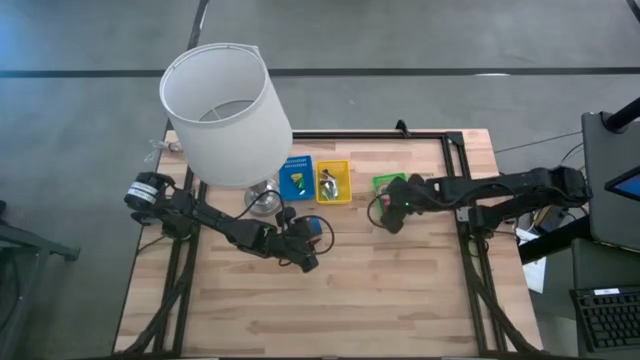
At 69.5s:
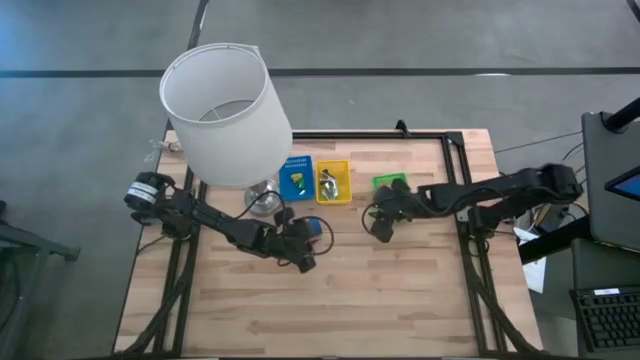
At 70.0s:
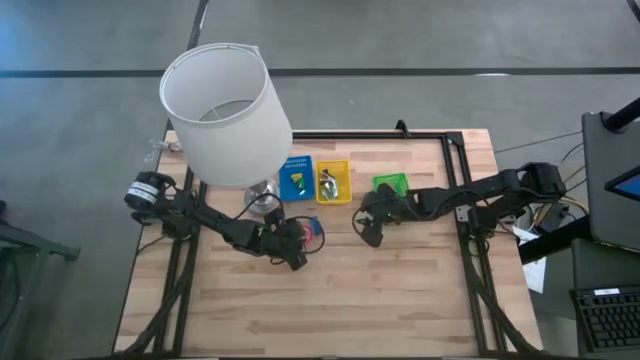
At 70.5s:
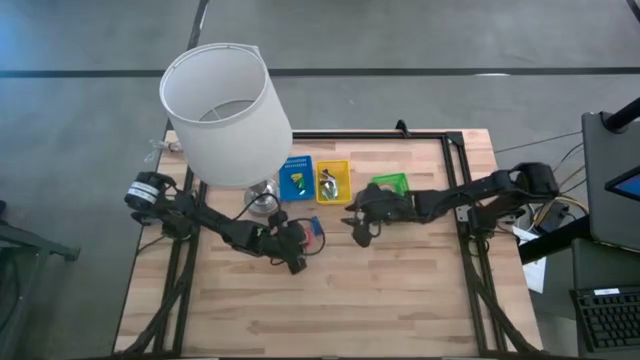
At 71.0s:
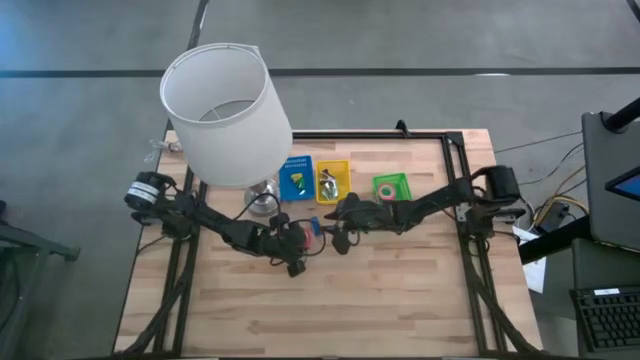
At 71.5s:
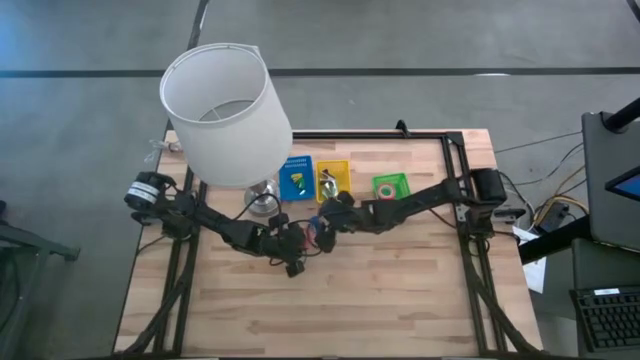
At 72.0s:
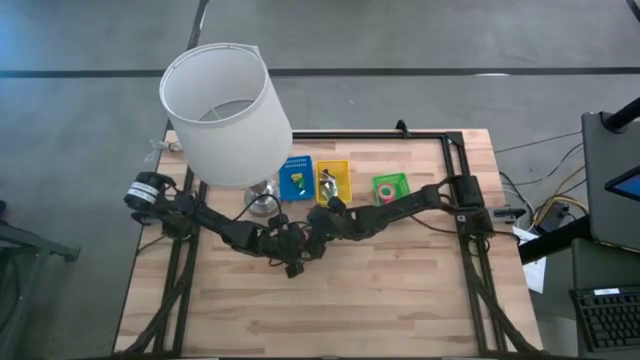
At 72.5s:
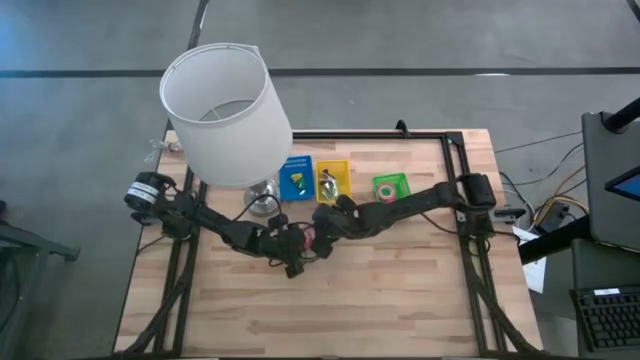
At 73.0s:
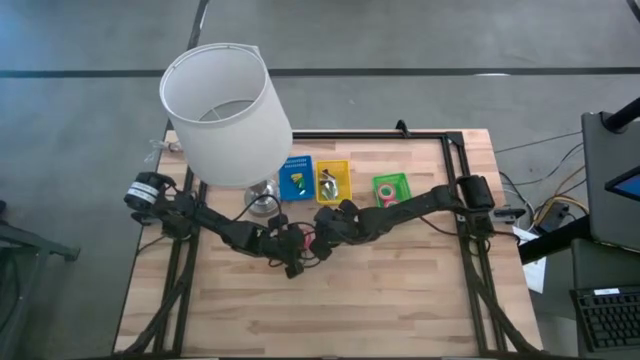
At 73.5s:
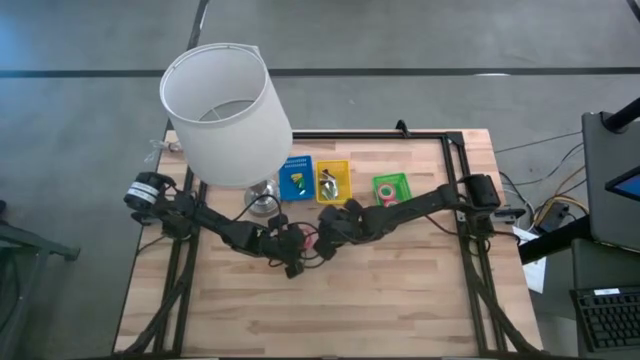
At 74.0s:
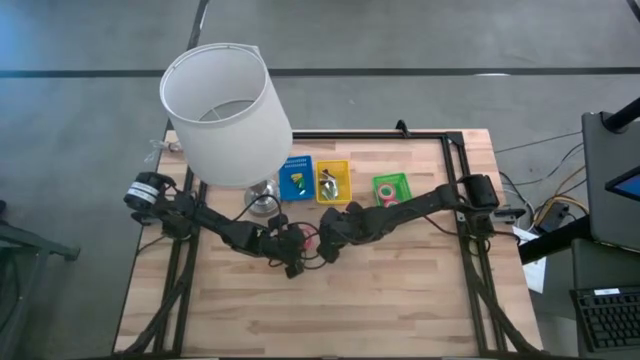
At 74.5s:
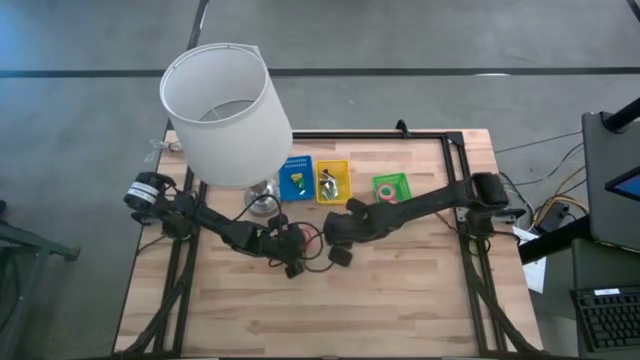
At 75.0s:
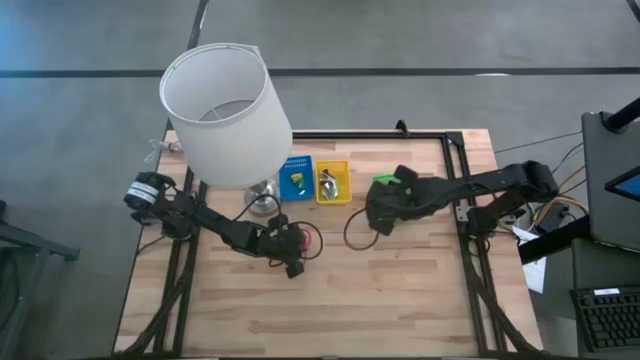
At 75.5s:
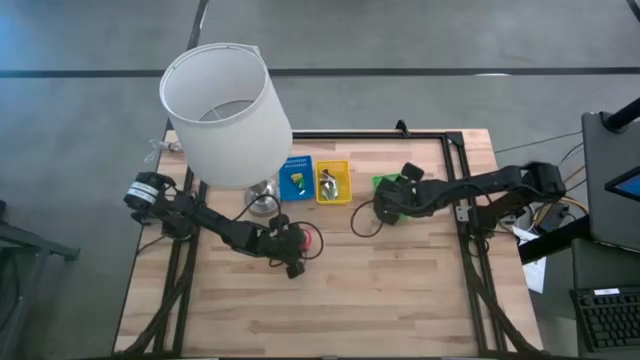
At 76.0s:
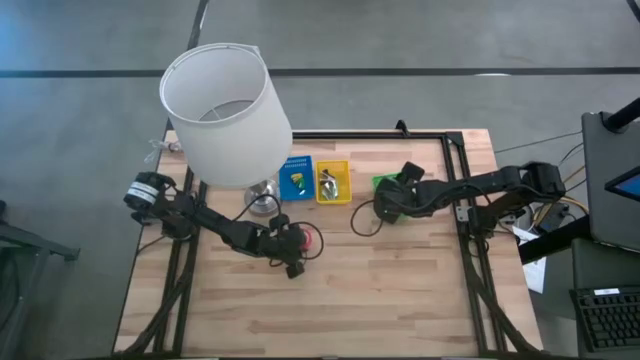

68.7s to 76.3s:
Task: Pick and place Stapler, Stapler remover, tape
Put the blue tape into the green bin

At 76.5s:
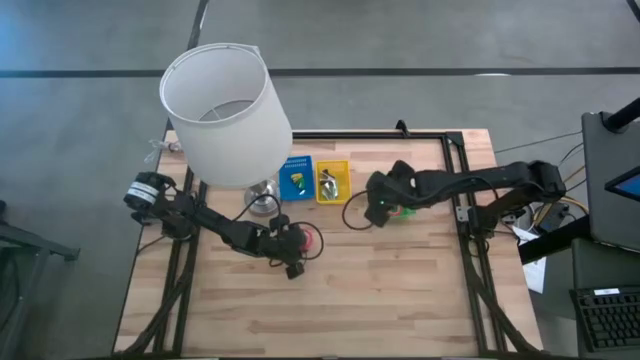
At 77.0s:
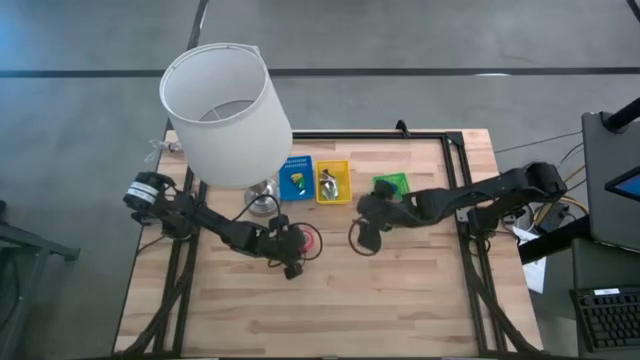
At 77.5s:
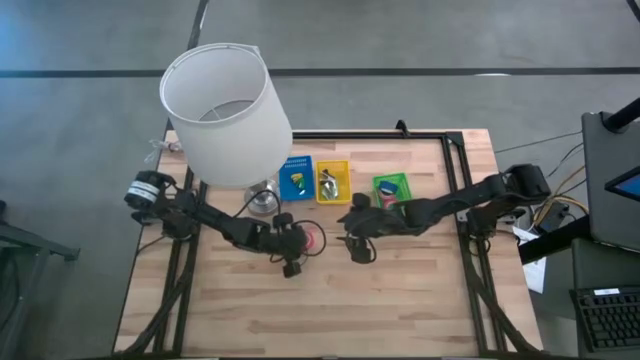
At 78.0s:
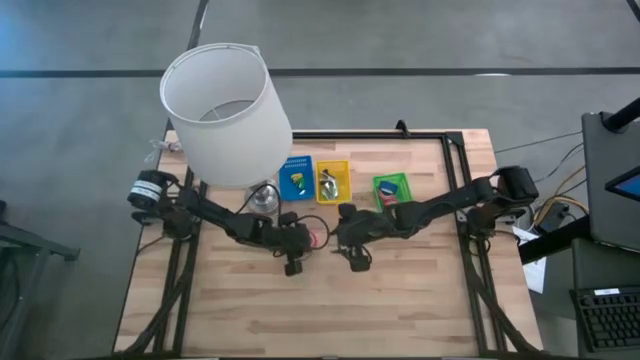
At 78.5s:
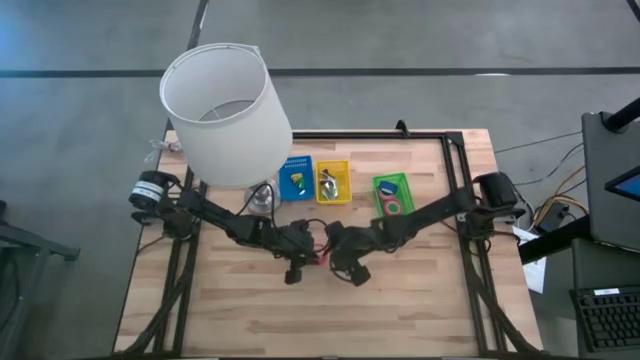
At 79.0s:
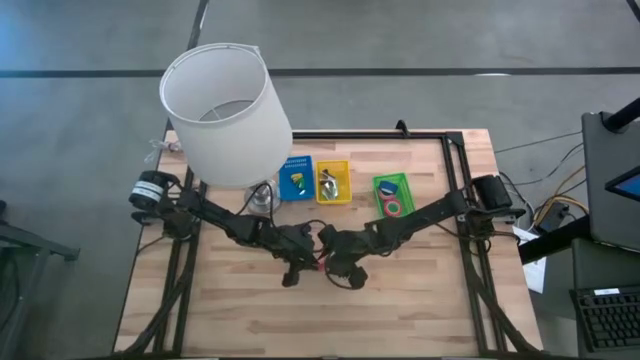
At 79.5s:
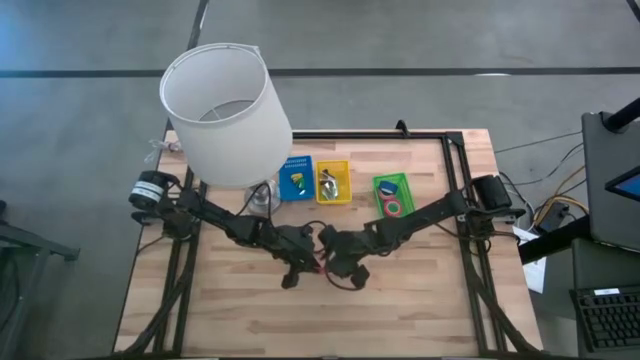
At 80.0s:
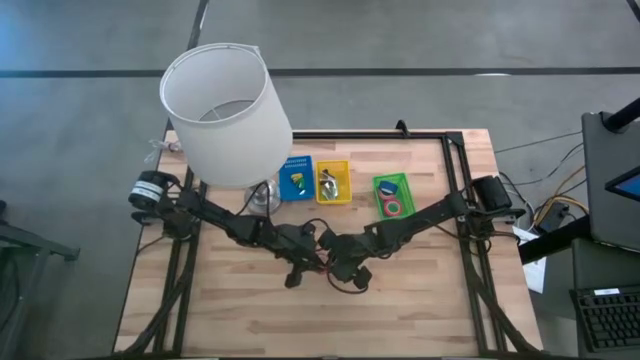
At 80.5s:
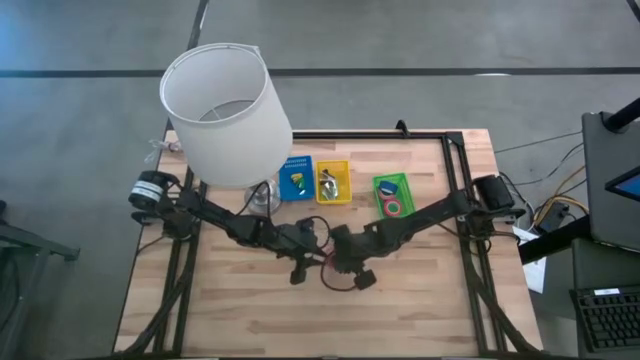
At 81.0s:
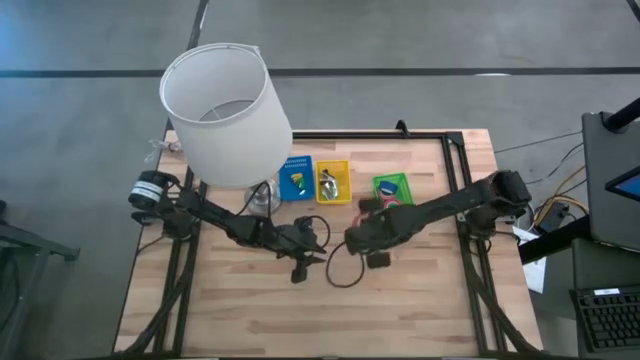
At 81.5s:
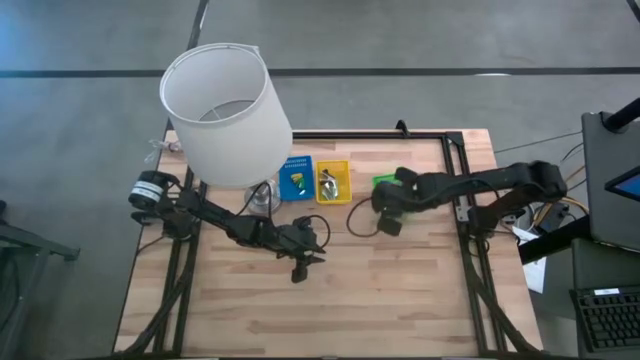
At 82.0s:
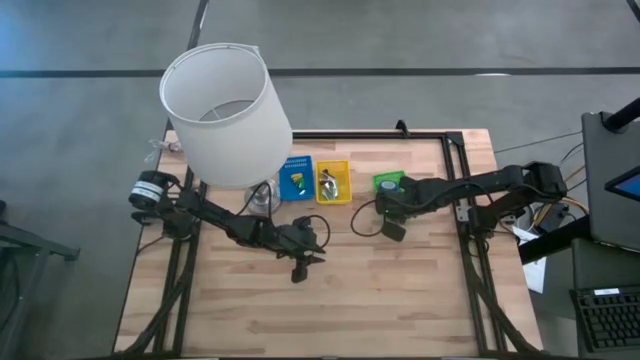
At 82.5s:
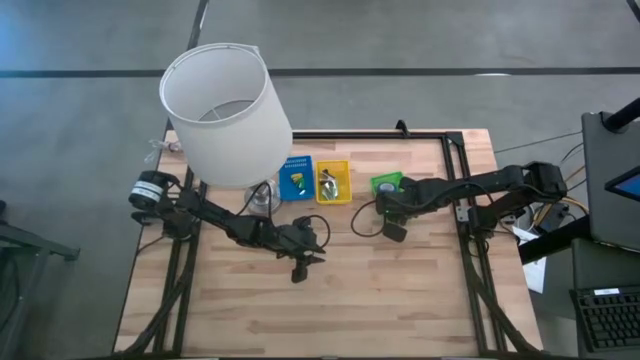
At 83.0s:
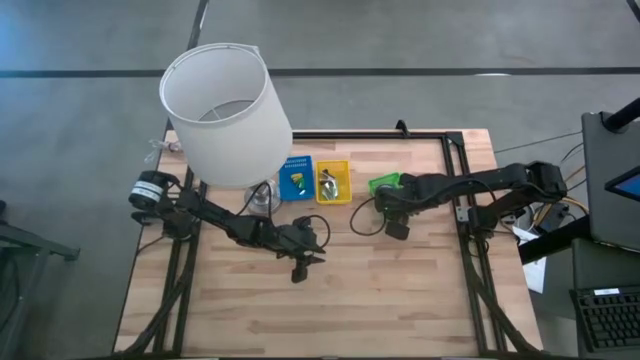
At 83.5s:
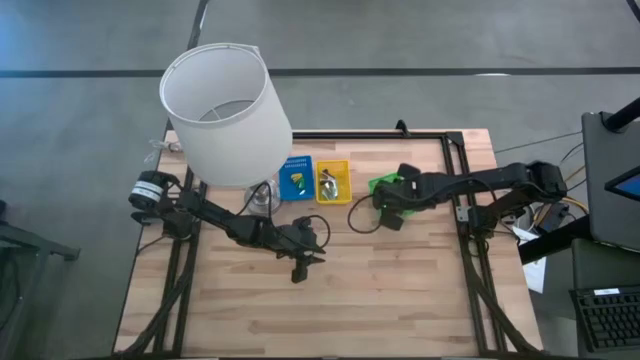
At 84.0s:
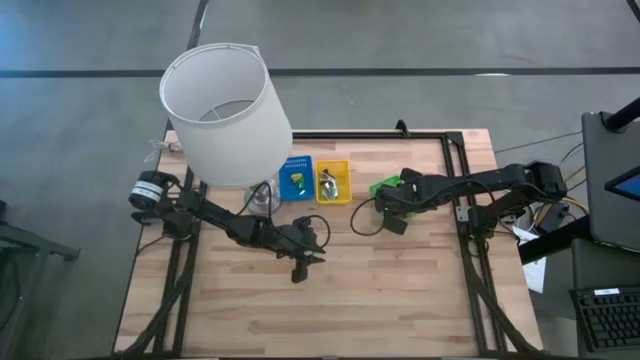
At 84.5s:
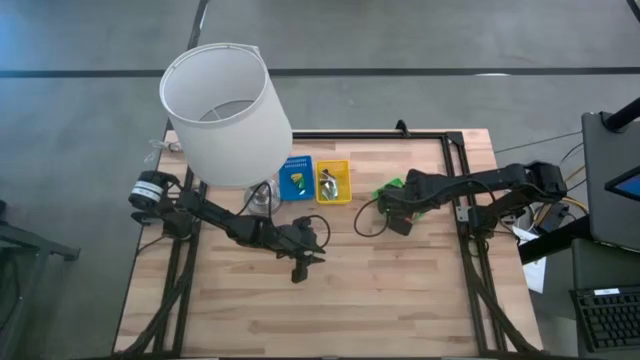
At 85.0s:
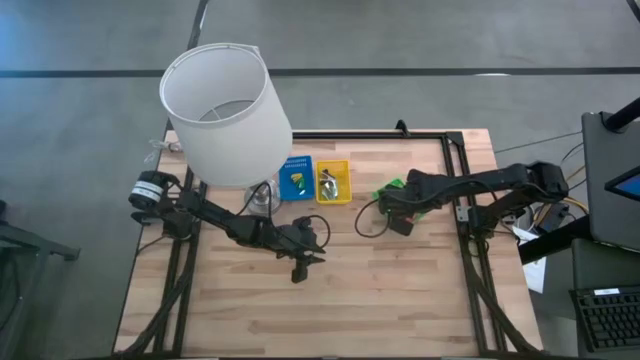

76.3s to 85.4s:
Put the red tape into the green bin

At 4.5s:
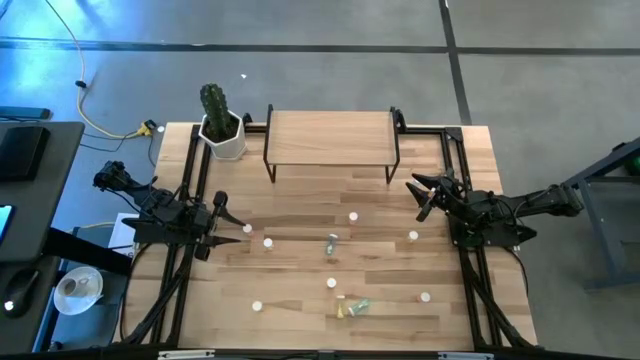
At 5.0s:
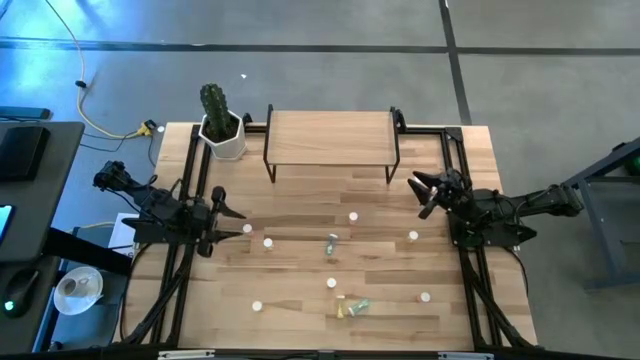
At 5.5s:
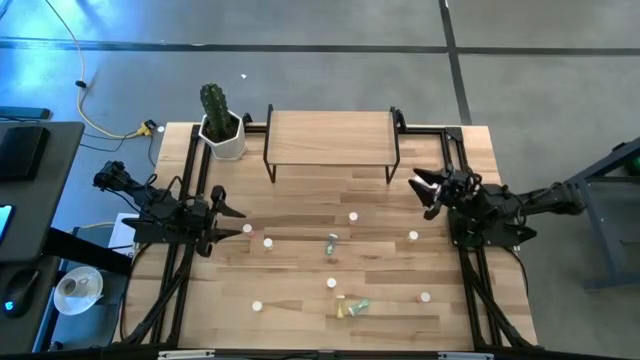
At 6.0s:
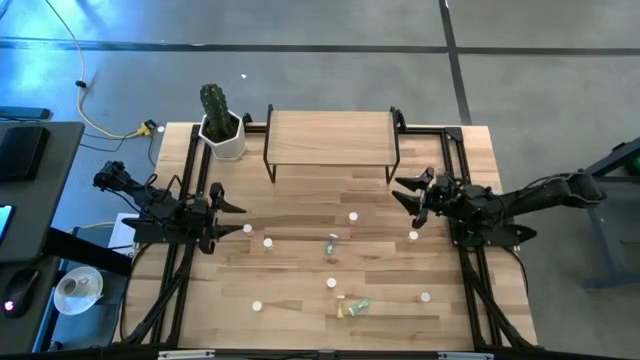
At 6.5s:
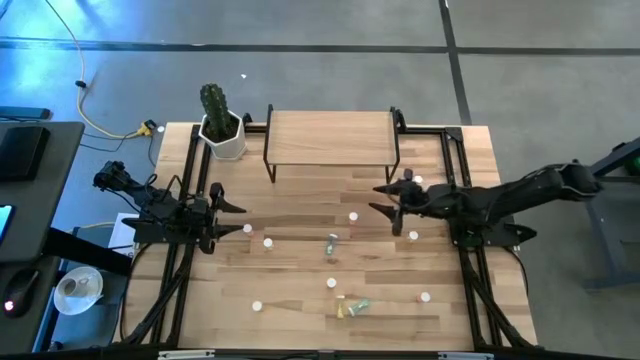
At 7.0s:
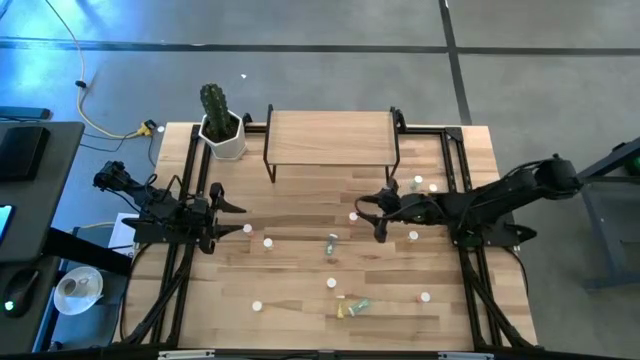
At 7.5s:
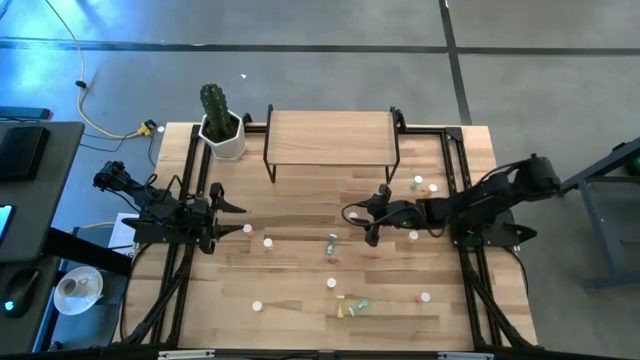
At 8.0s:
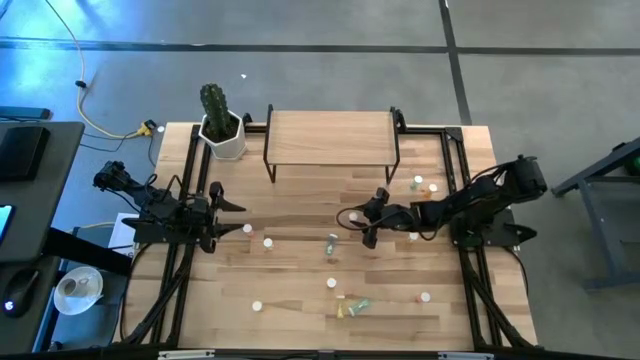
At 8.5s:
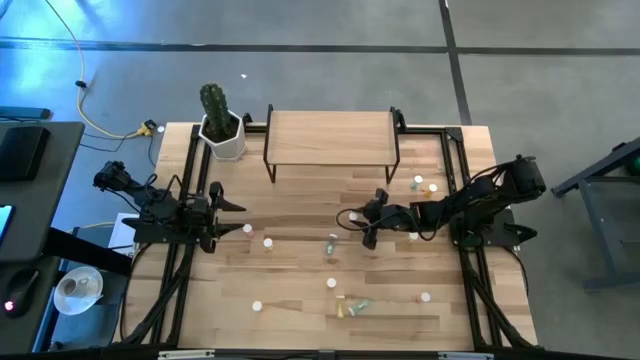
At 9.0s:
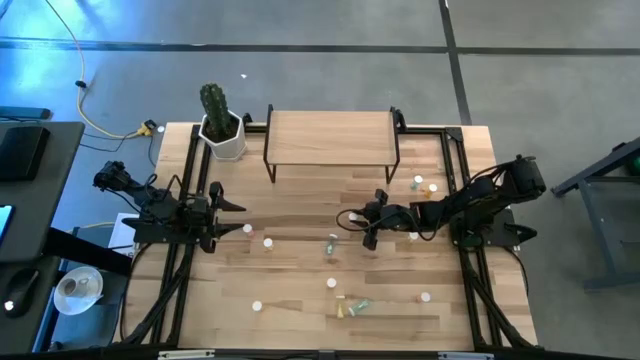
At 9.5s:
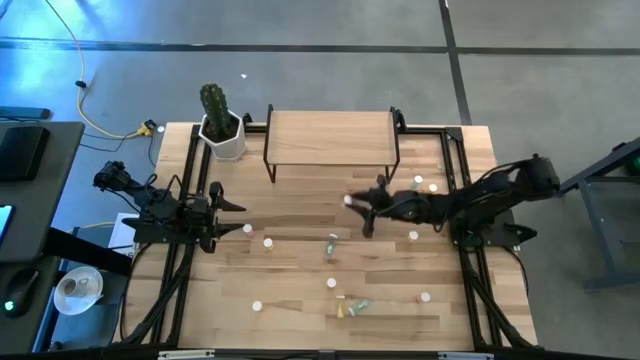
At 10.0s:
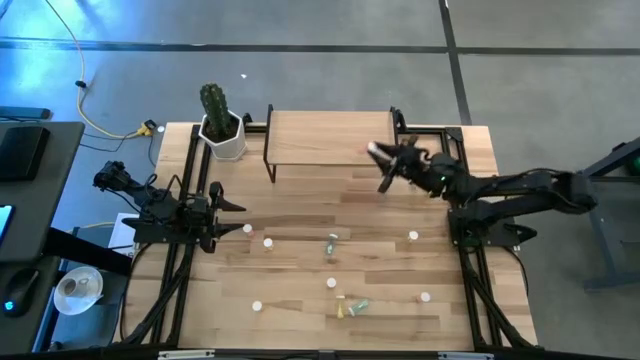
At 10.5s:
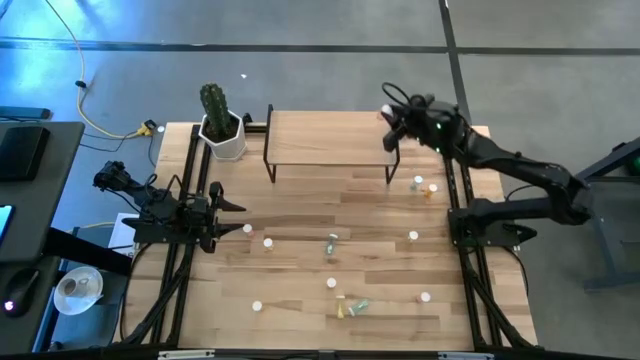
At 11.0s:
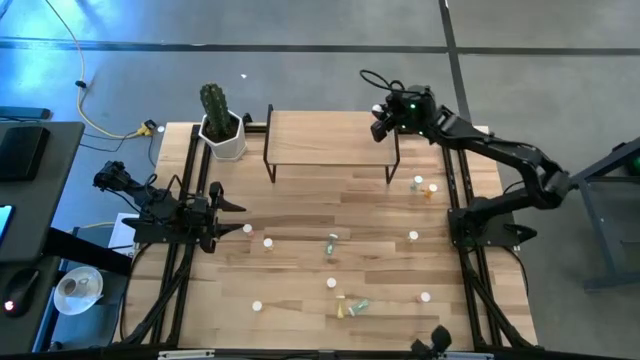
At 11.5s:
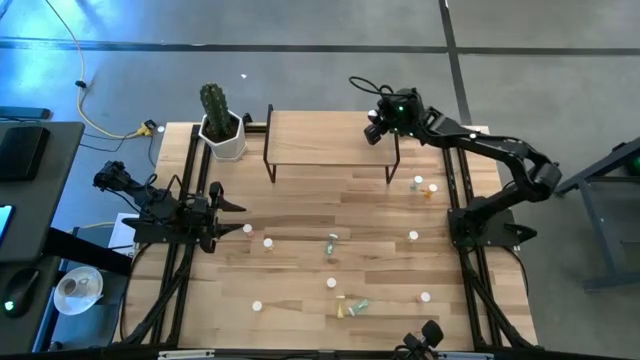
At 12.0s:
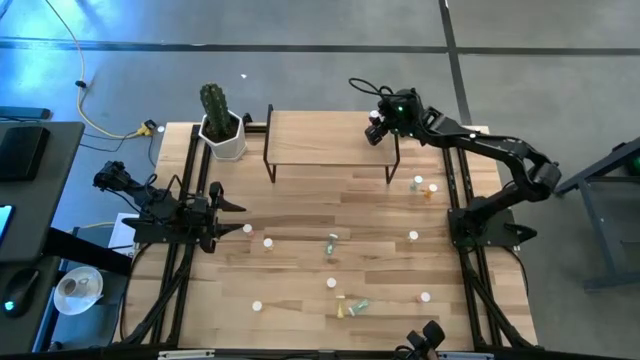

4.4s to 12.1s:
Task: Pick and place medicine bottles onto shelf by color
Put the center pink pill bottle on the shelf
